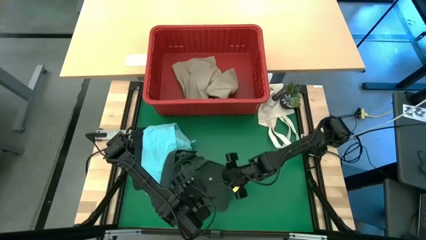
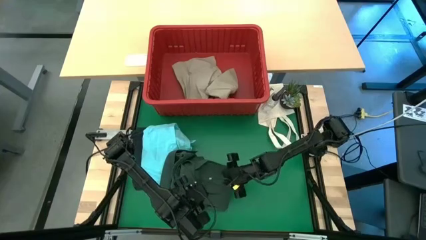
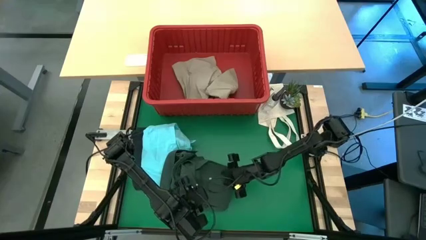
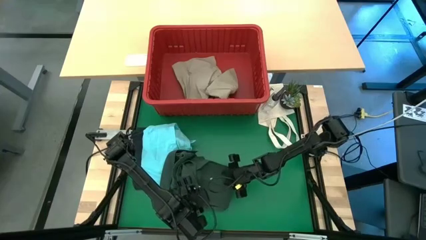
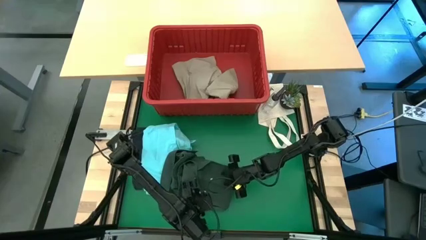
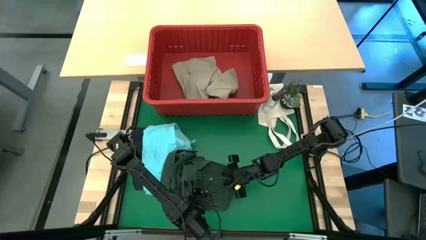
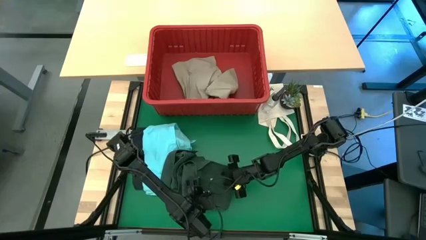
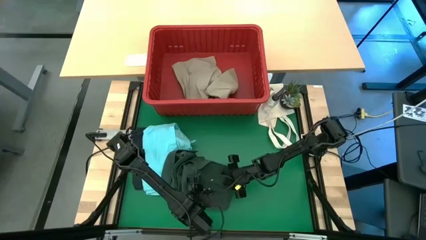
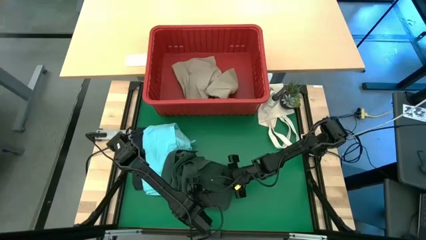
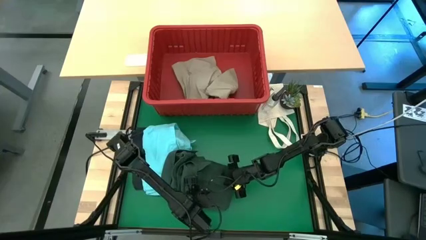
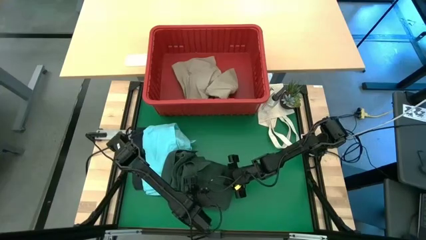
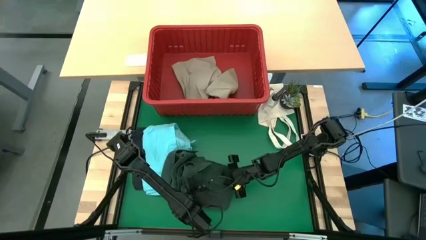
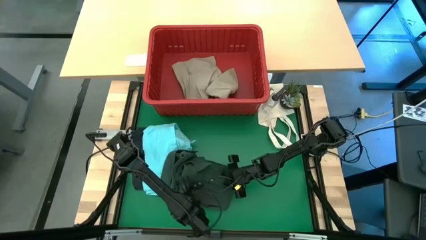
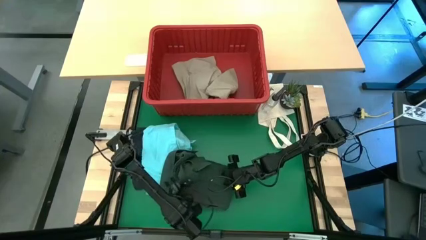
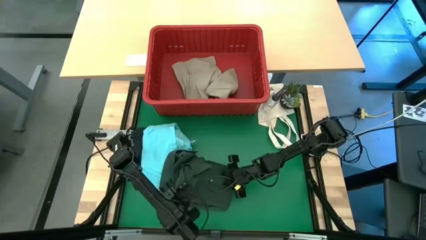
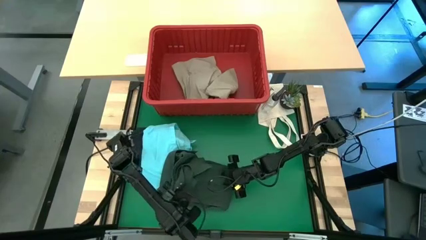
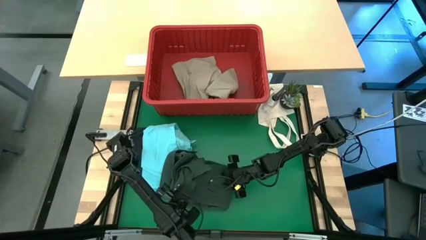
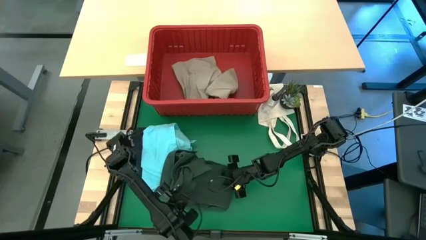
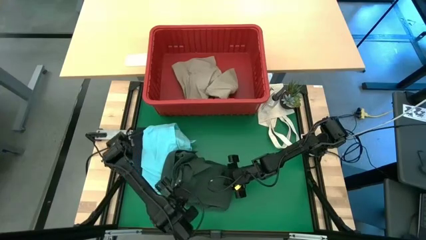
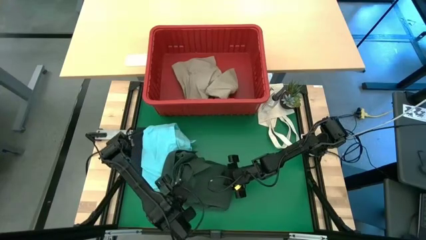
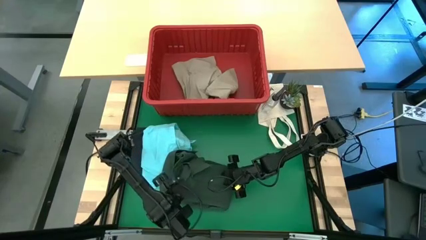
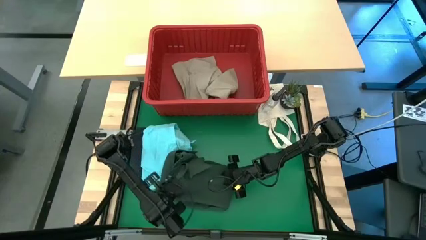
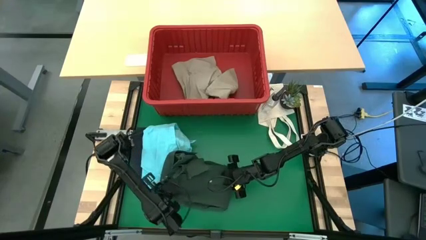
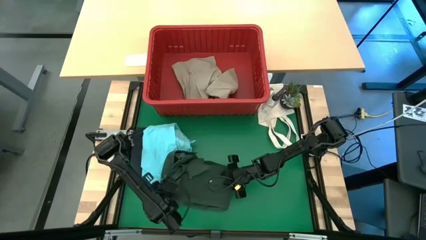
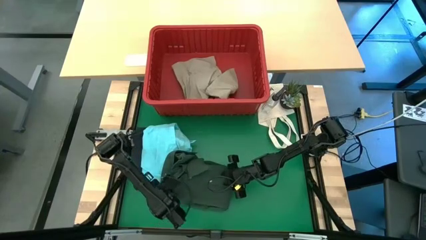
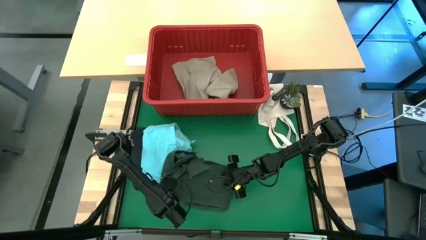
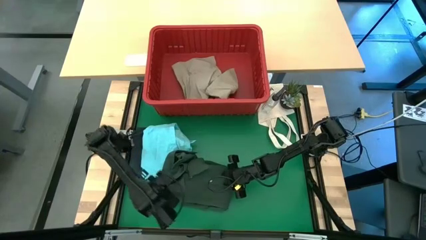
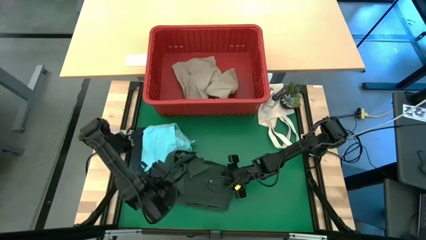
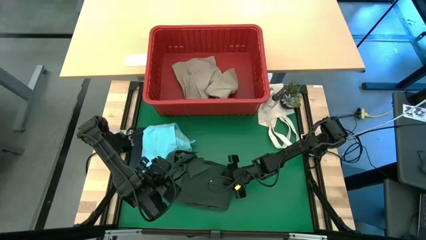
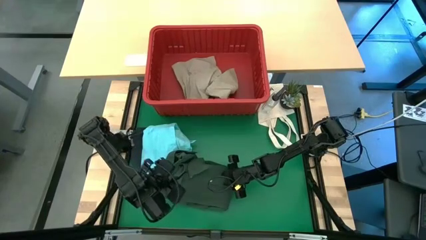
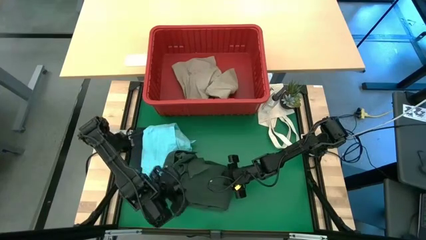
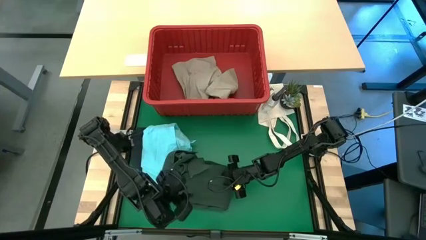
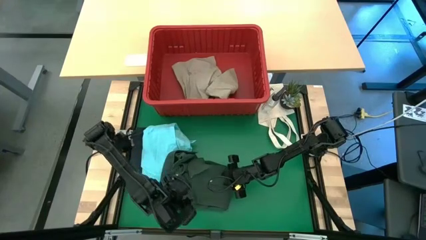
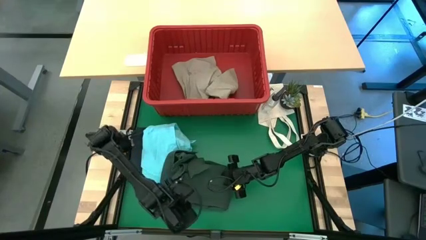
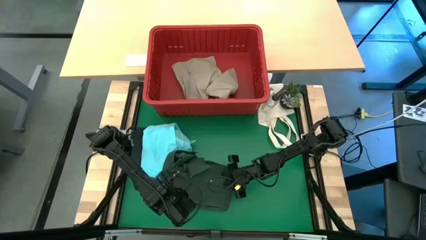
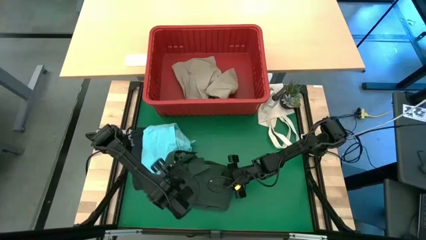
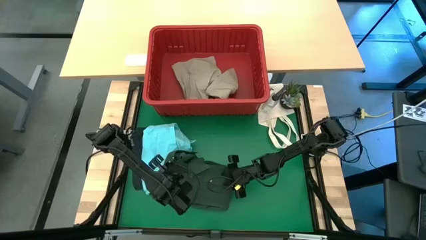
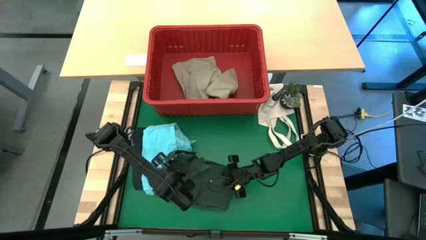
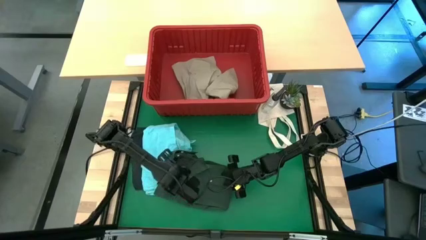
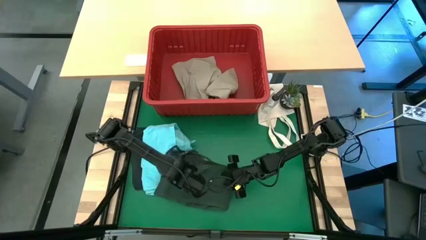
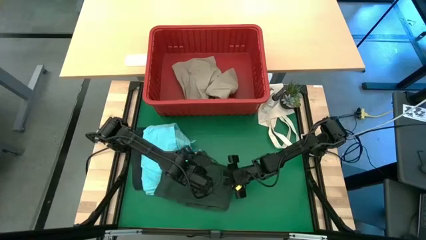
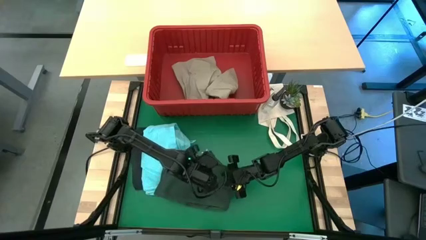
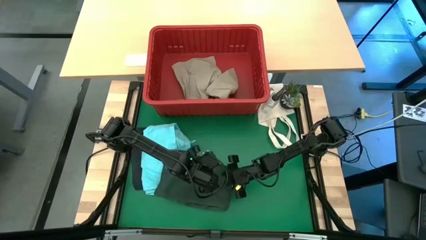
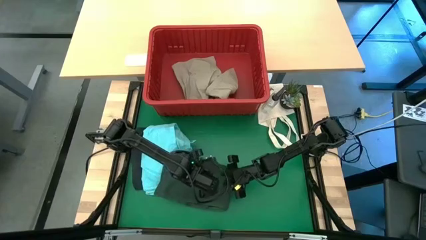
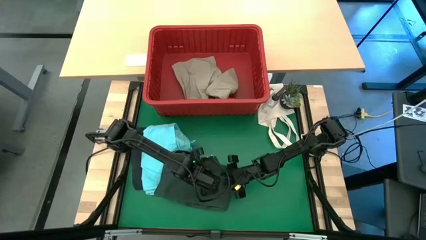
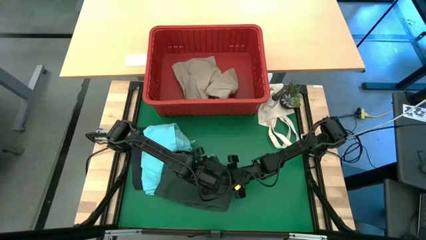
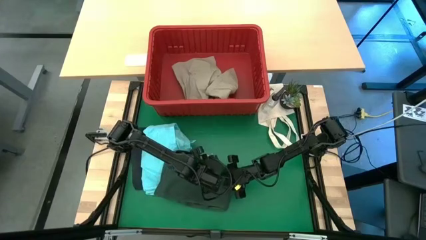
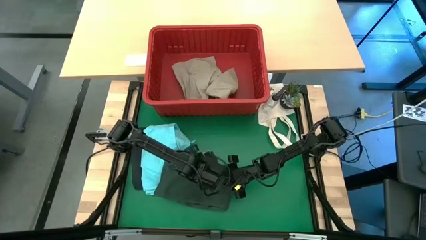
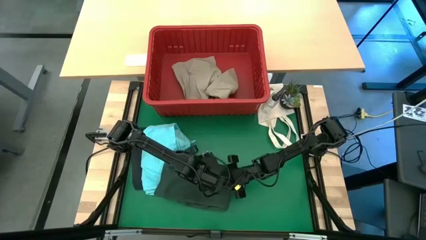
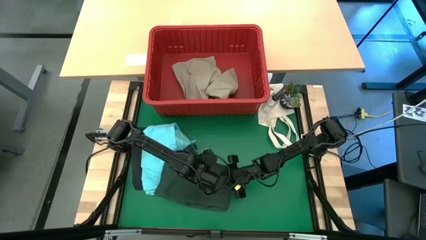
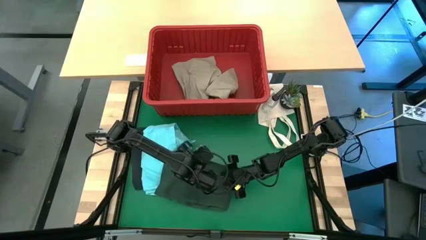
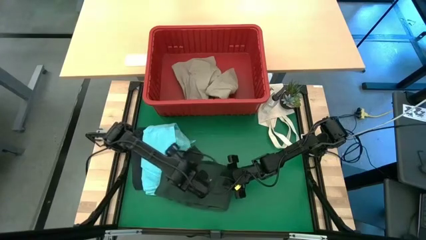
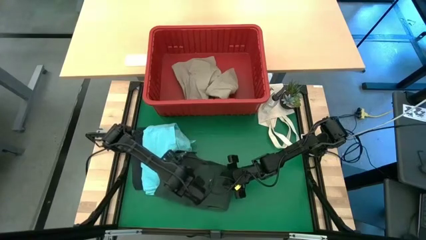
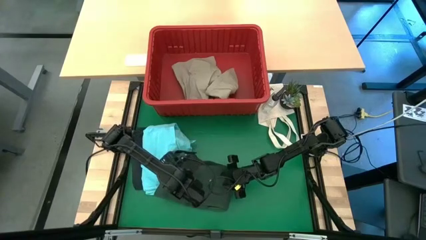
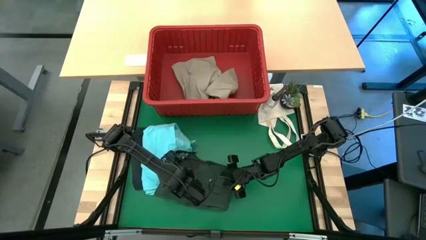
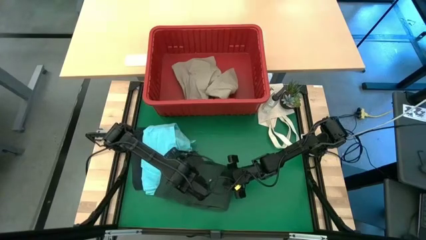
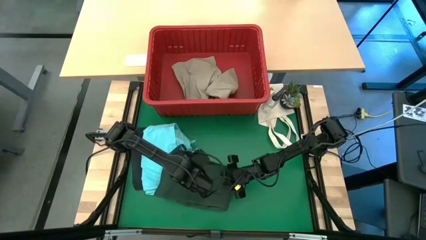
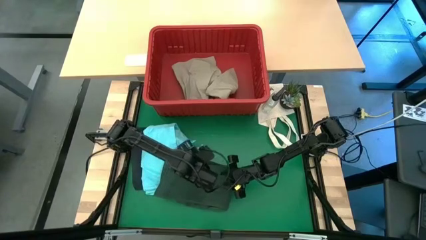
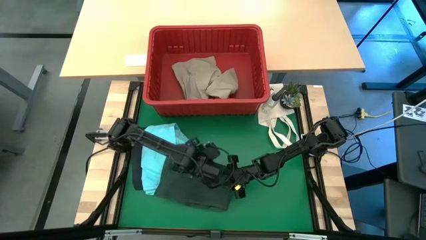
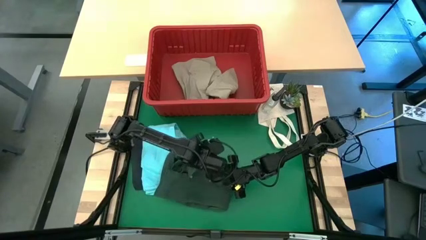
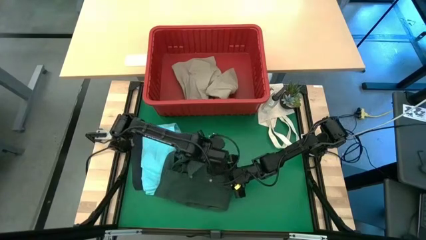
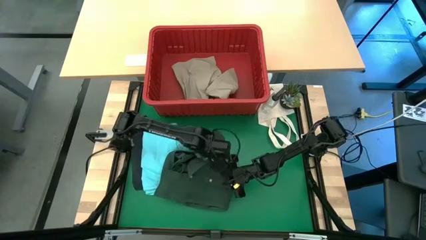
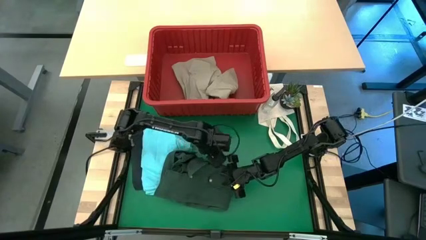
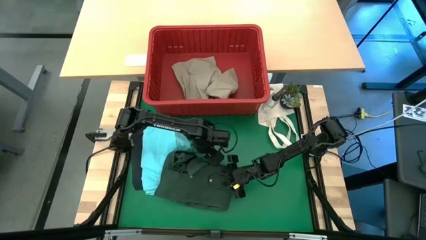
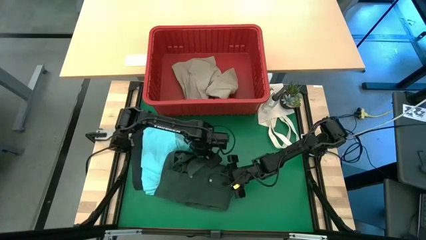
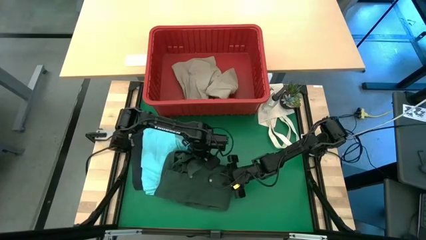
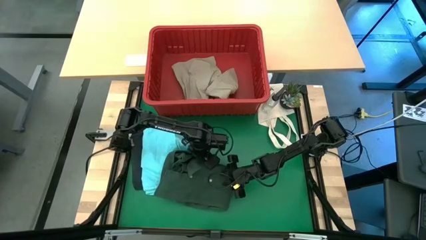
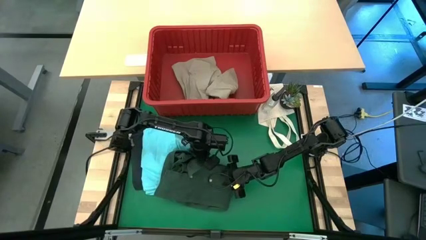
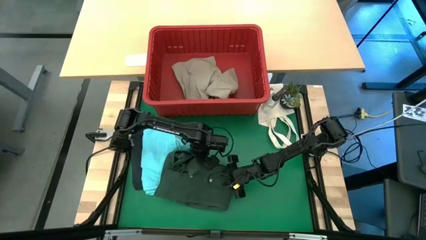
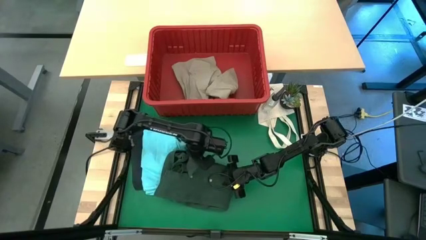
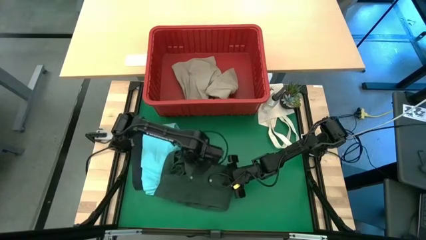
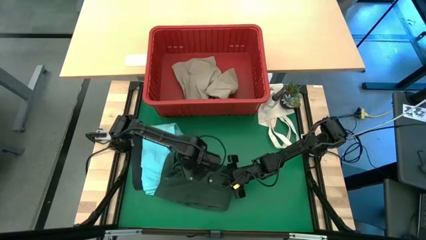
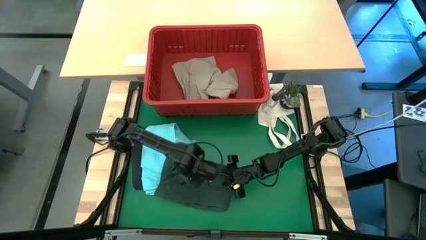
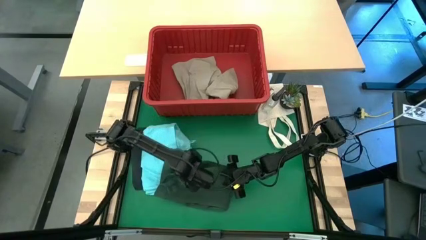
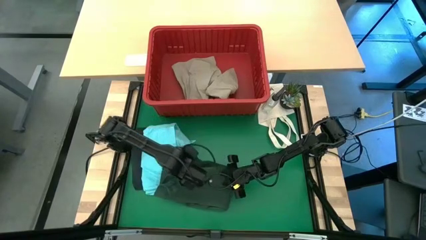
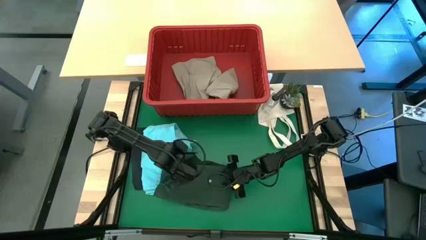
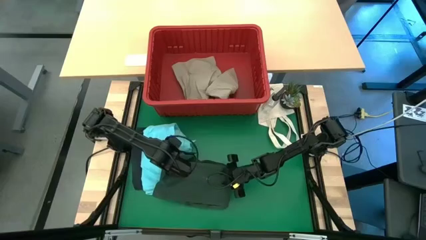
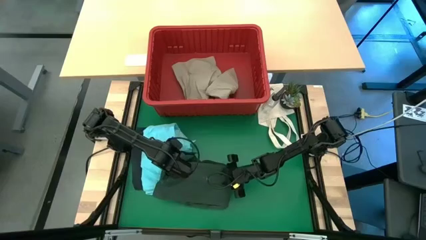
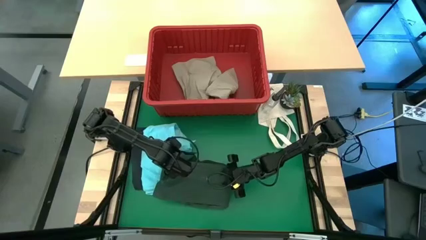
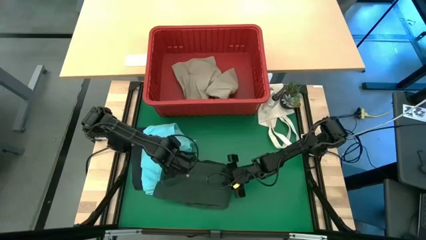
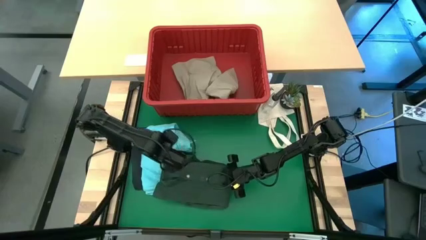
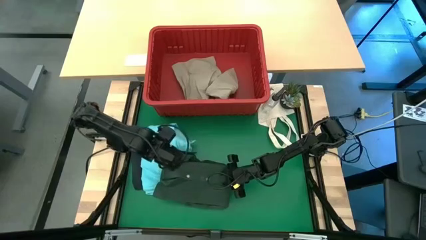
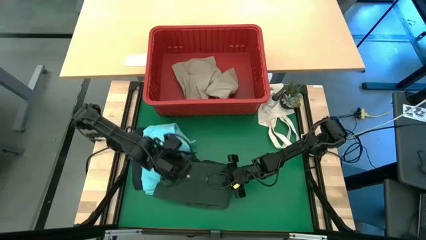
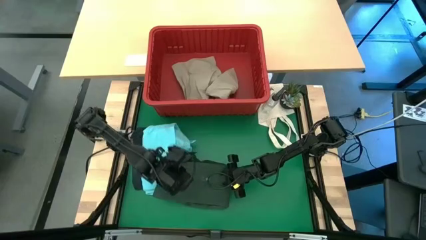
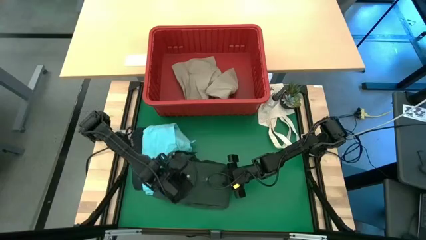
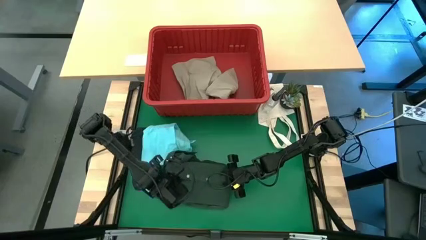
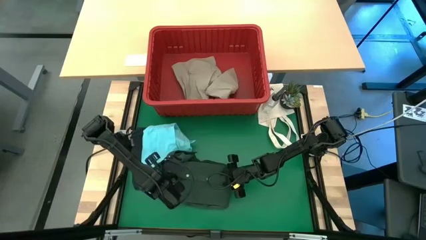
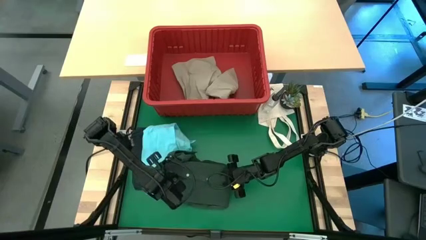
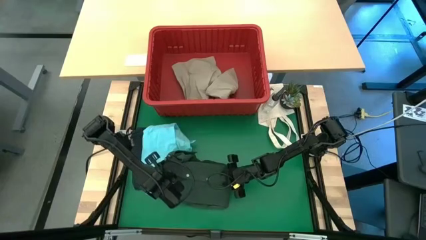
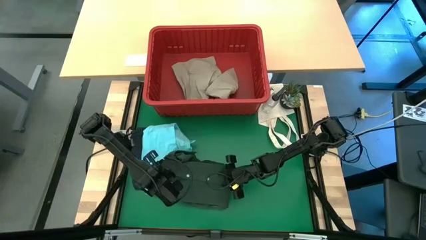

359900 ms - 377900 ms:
Task: Fold Laundry from Bin
Fold the green polo shirt from the red laundry bin
